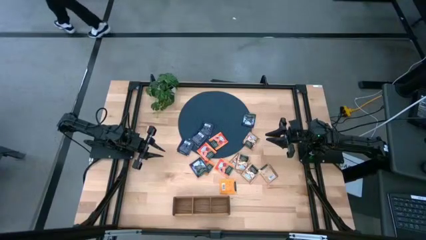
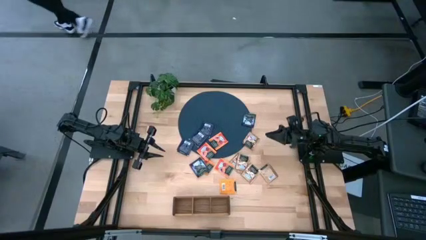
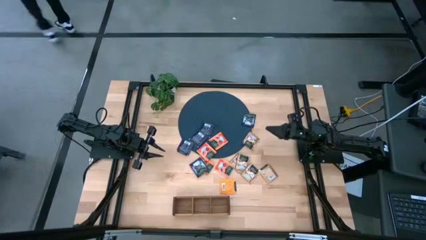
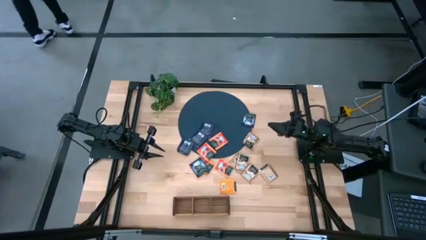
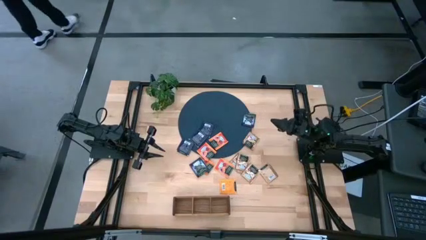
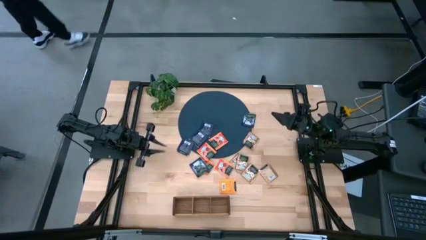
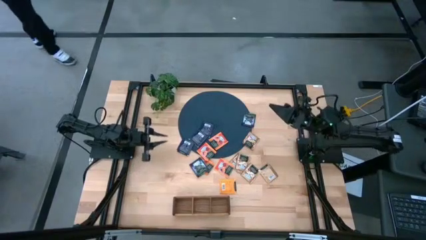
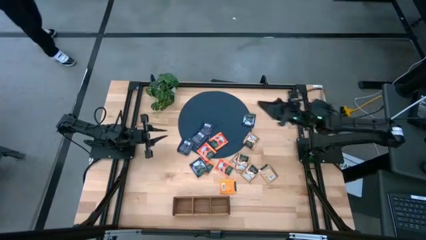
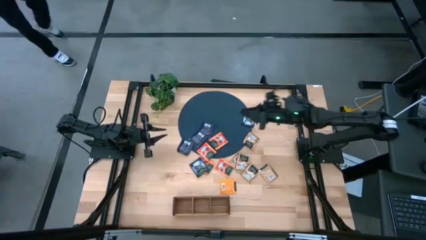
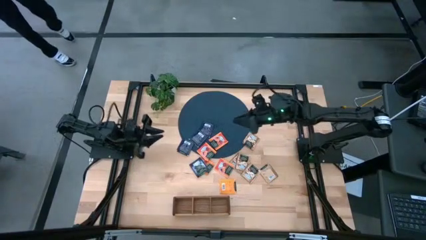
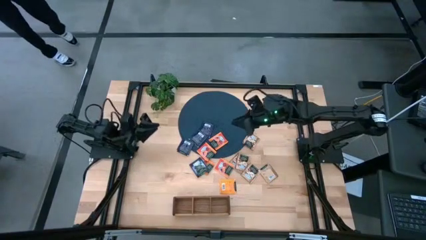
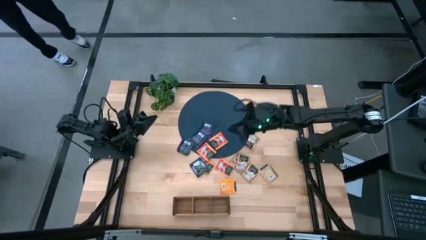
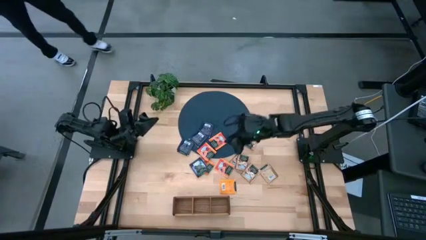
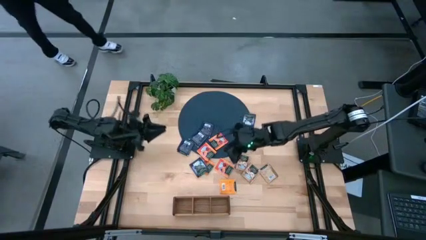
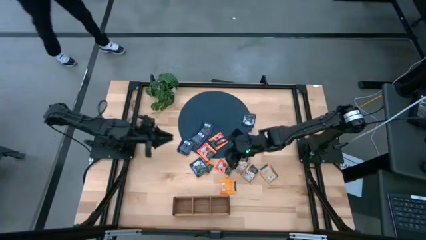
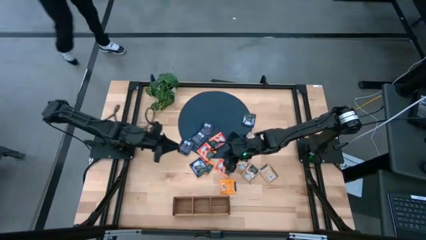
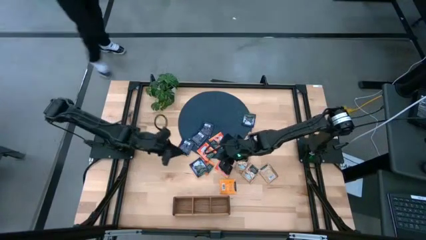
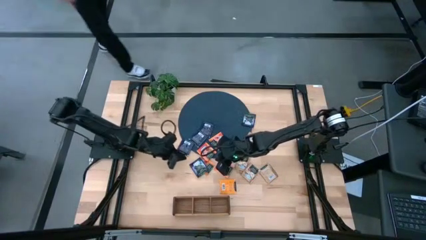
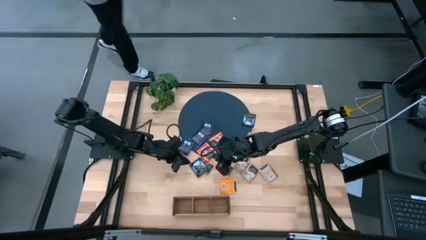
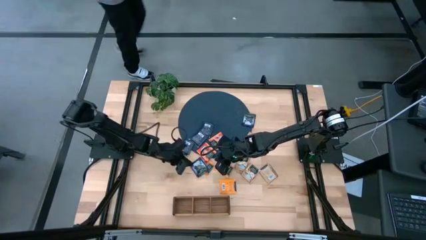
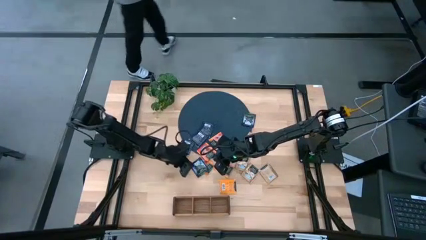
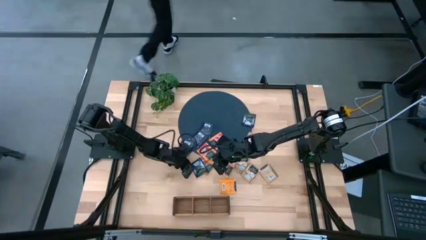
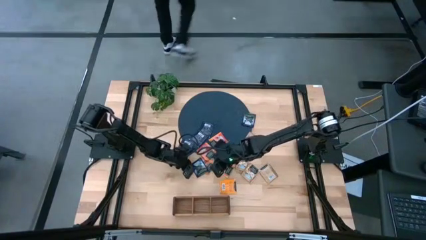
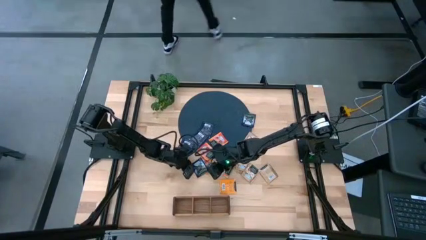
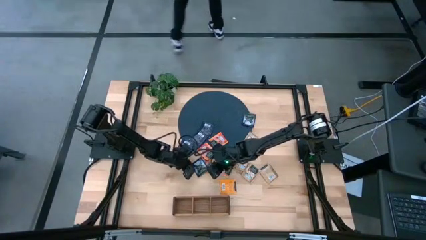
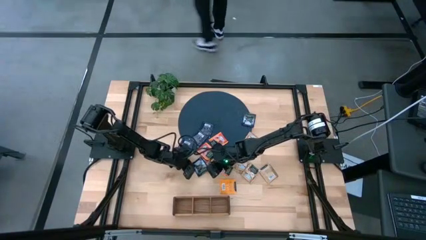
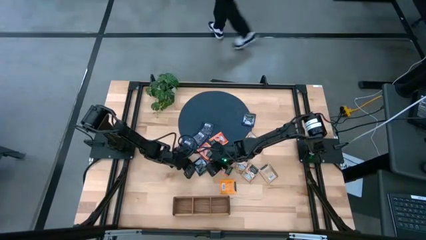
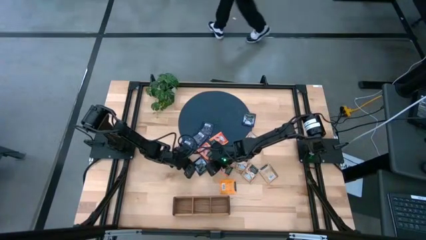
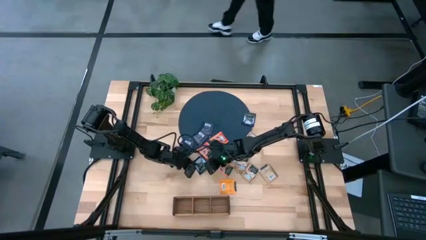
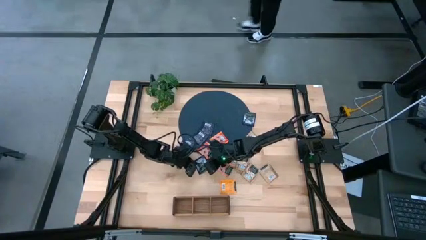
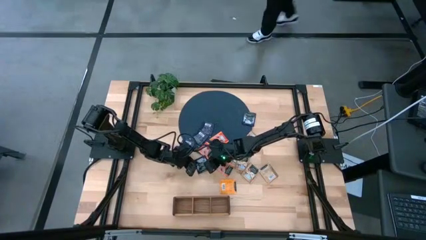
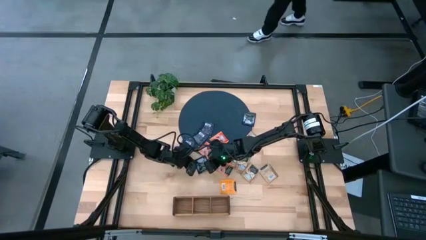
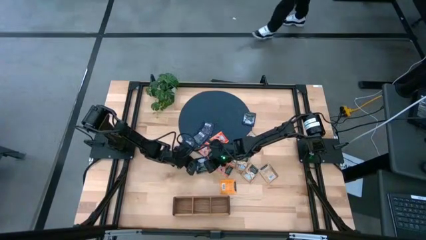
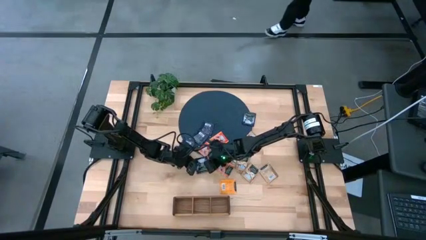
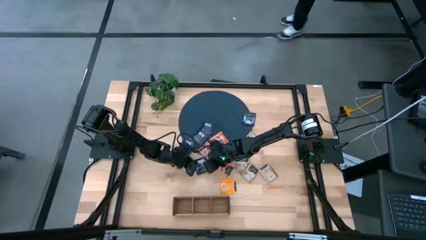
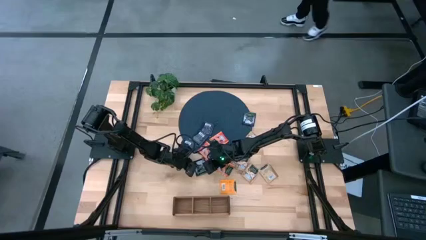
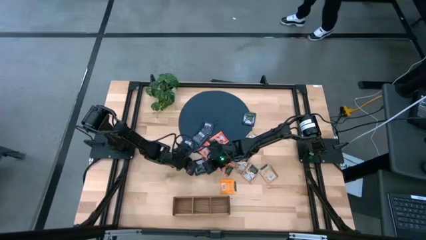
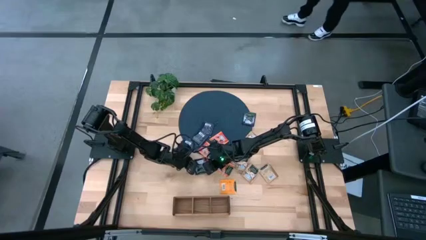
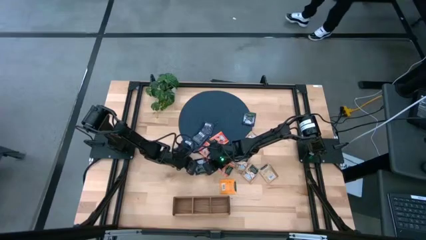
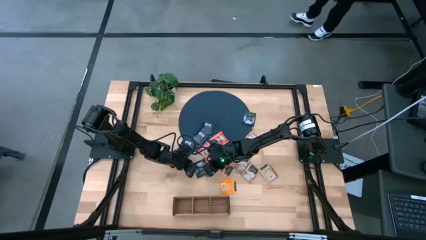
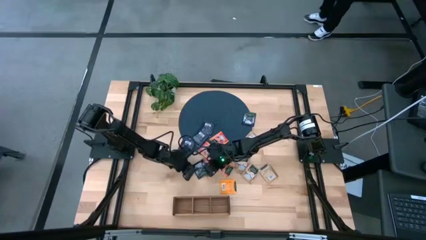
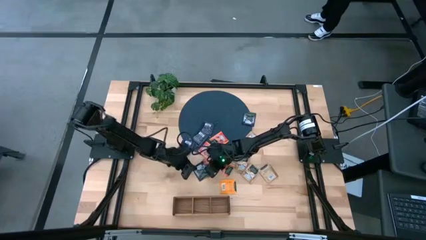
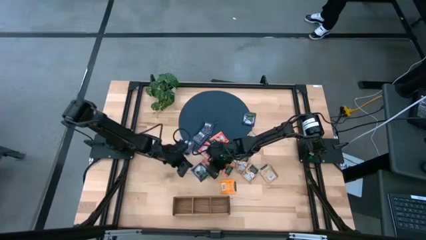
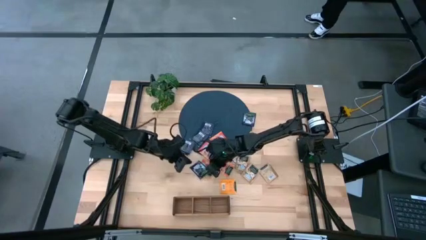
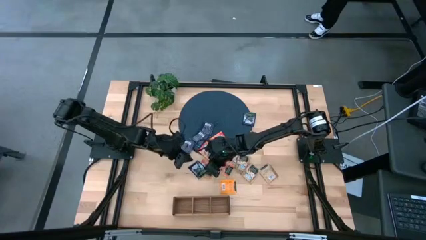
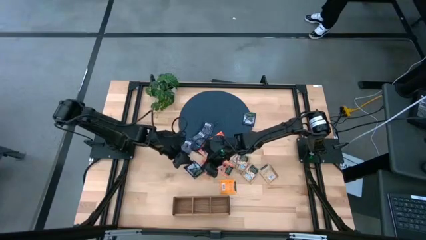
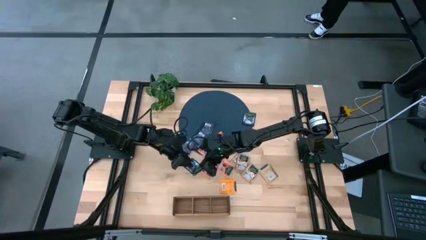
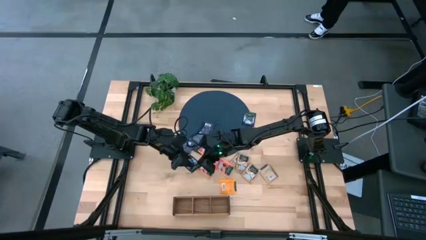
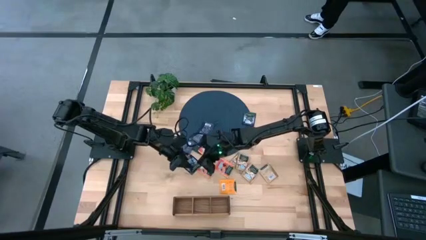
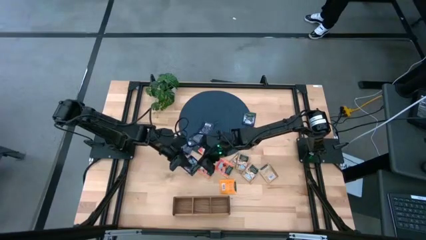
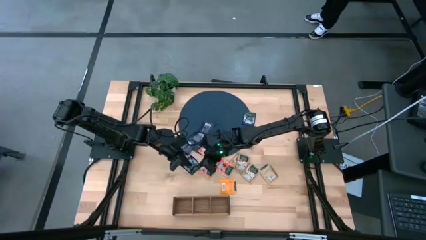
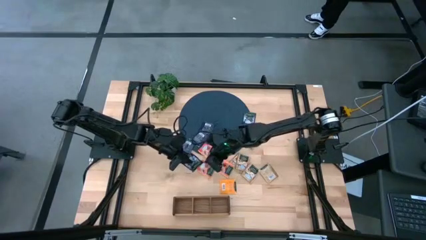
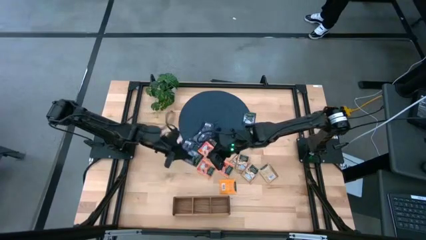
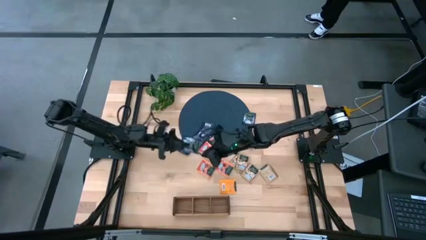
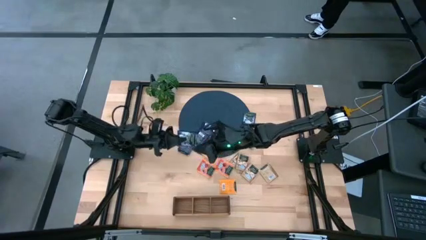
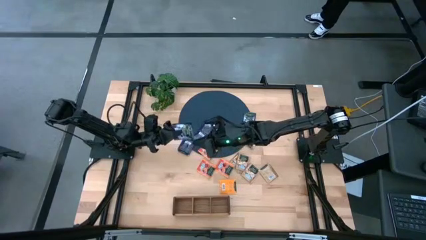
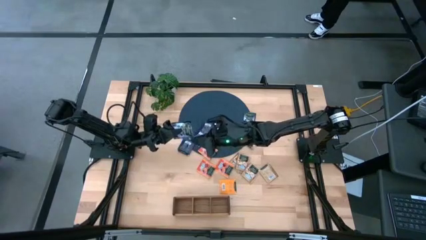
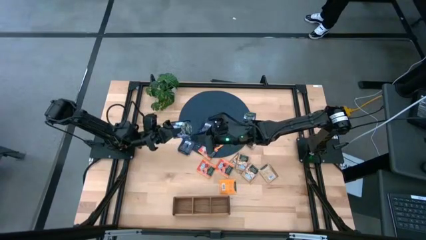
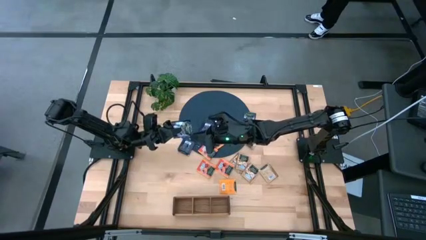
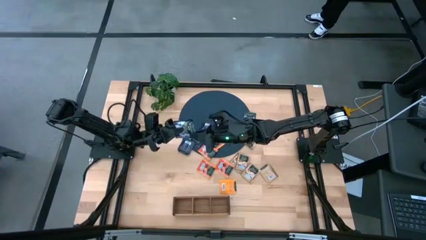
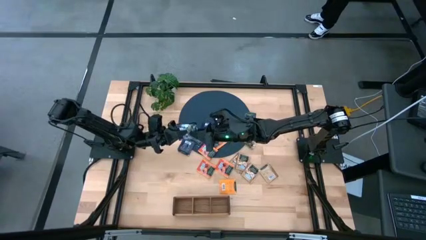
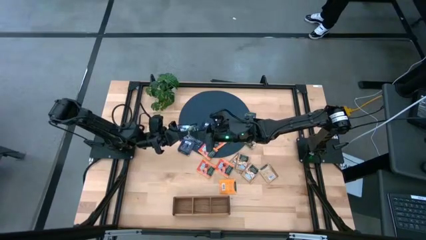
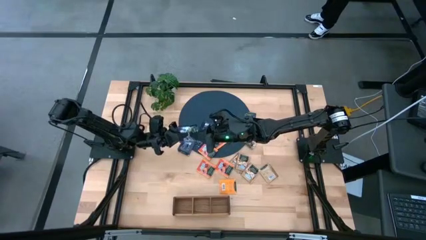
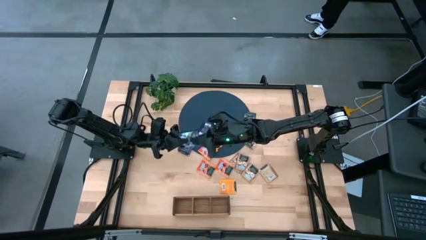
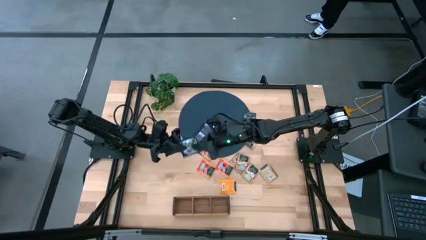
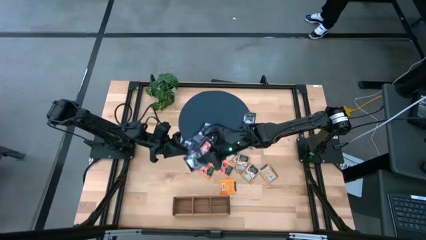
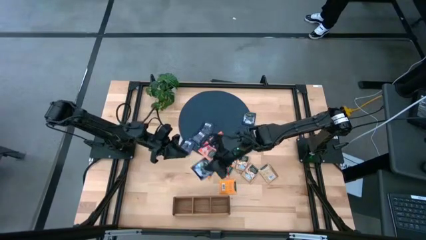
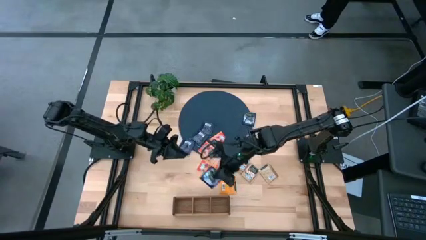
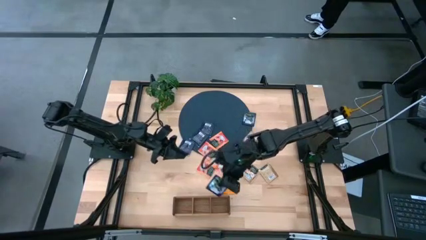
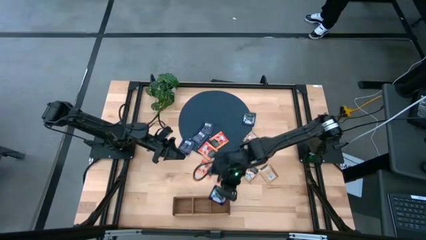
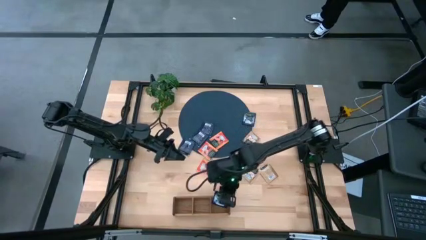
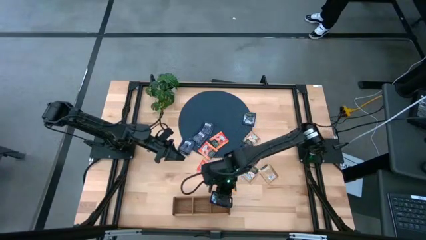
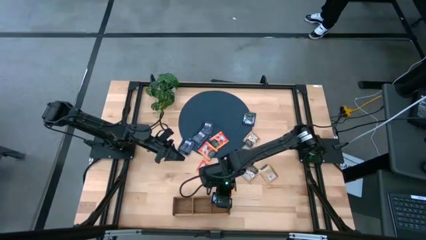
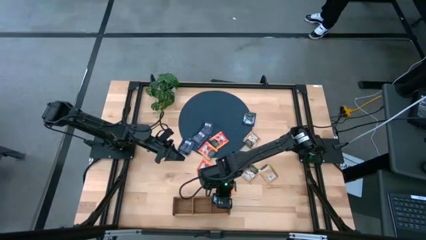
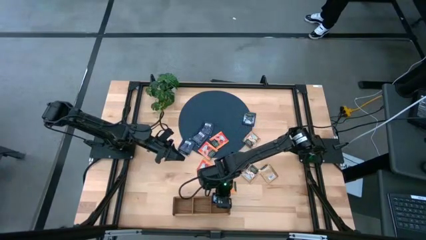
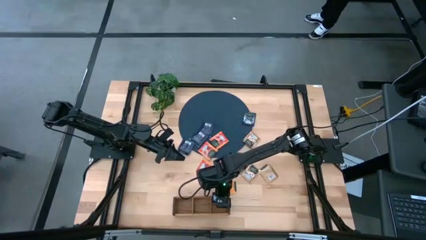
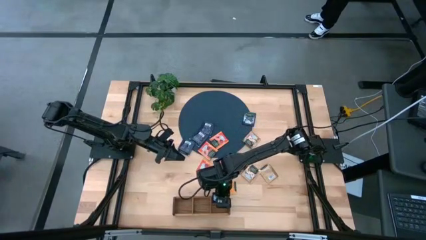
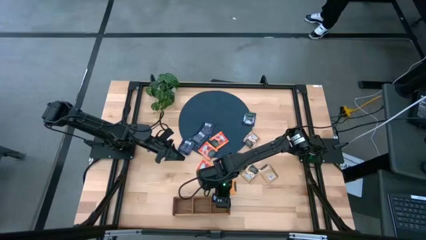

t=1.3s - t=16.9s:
Task: Pick & Place Tea
Put the violet tea bag into the right section of the wooden organizer
